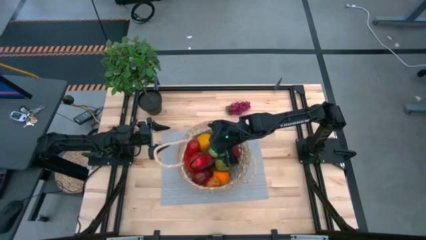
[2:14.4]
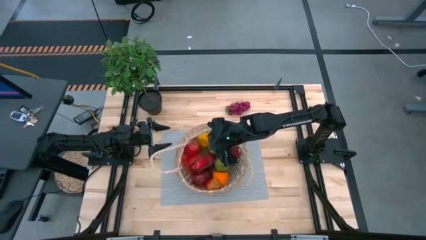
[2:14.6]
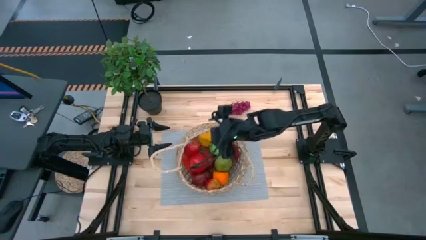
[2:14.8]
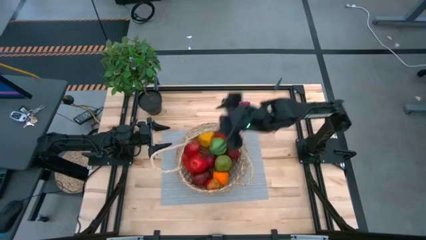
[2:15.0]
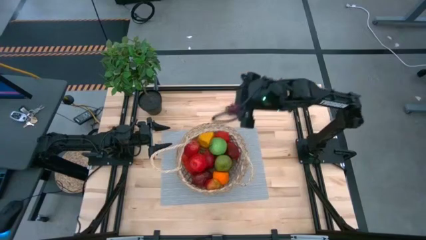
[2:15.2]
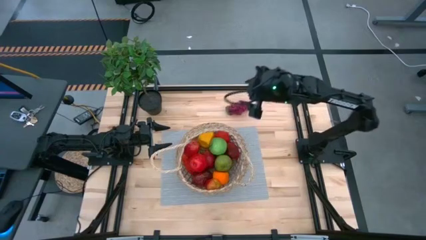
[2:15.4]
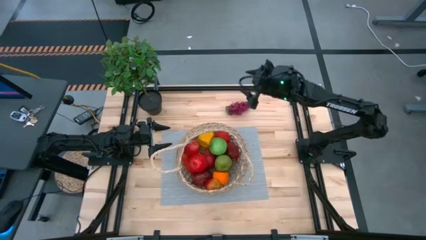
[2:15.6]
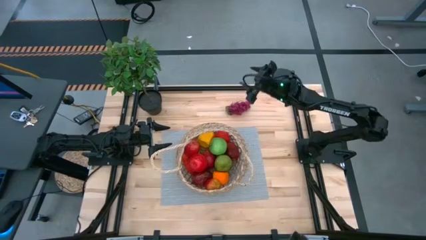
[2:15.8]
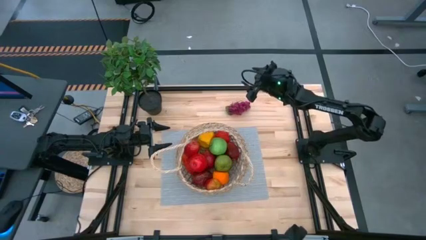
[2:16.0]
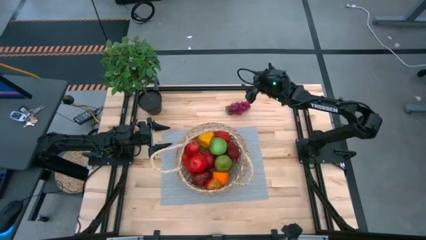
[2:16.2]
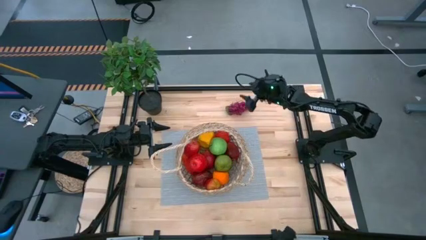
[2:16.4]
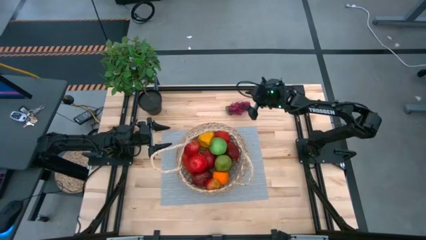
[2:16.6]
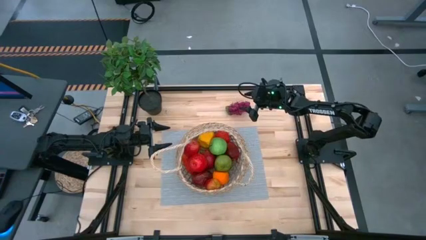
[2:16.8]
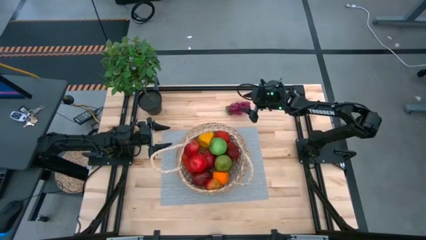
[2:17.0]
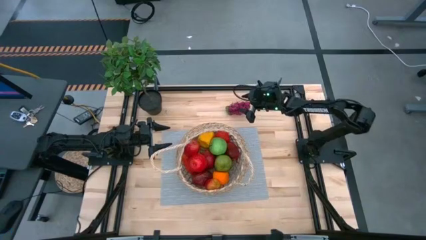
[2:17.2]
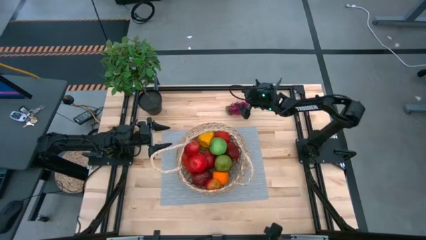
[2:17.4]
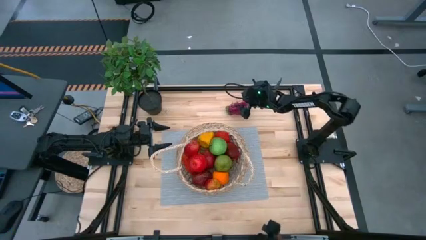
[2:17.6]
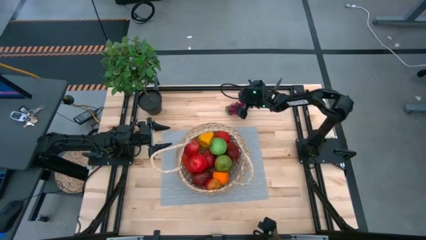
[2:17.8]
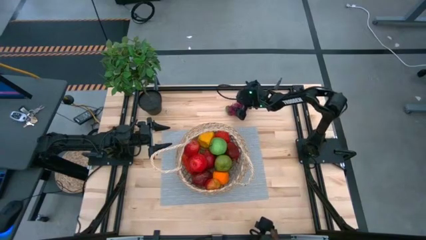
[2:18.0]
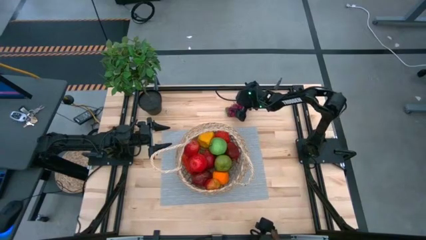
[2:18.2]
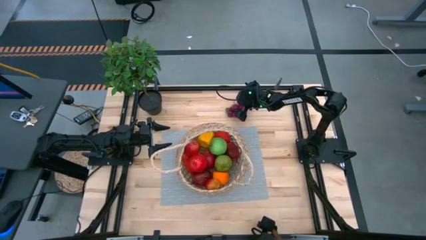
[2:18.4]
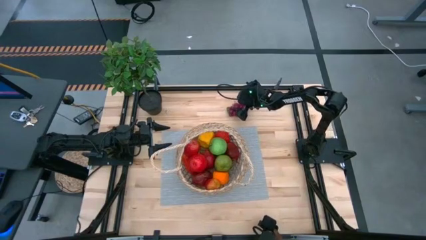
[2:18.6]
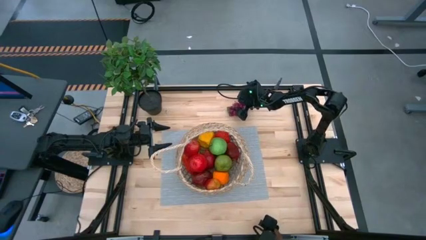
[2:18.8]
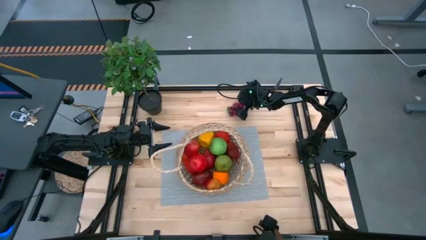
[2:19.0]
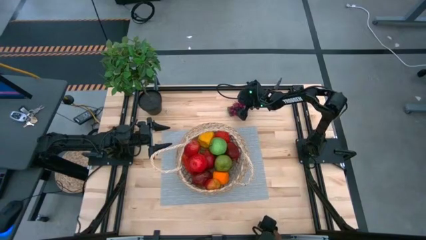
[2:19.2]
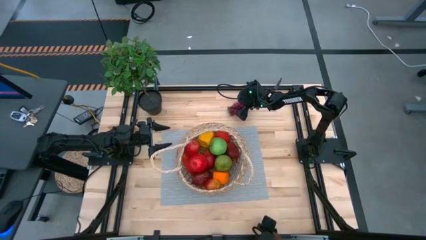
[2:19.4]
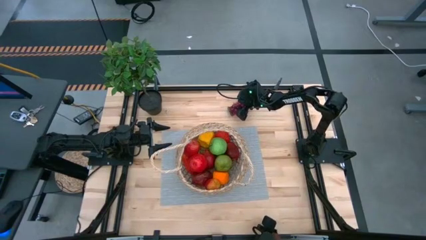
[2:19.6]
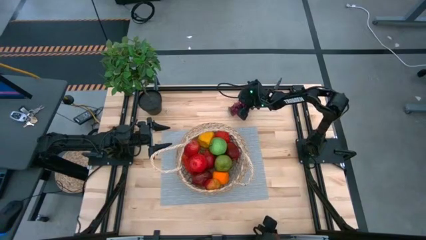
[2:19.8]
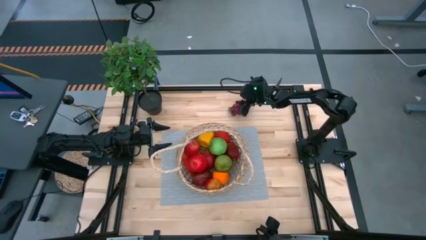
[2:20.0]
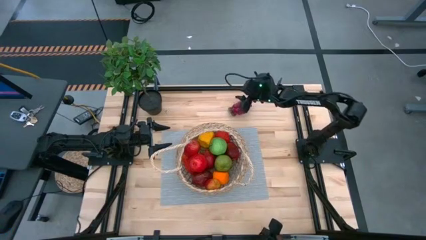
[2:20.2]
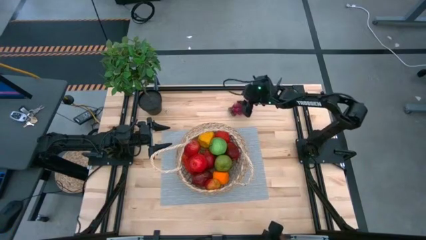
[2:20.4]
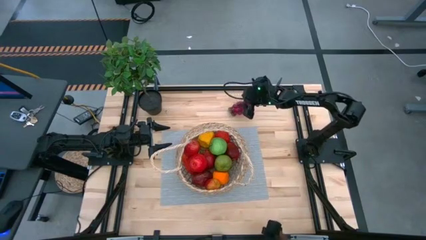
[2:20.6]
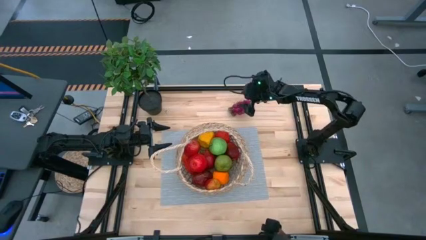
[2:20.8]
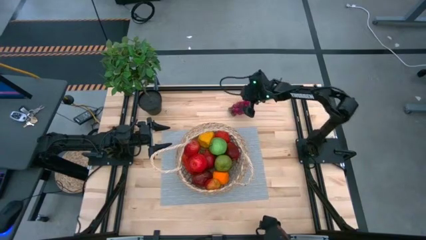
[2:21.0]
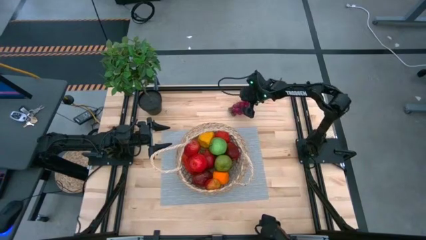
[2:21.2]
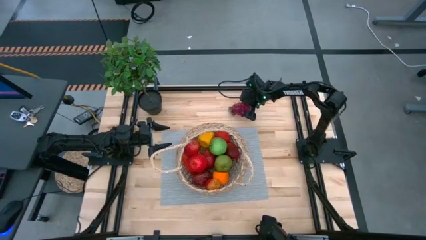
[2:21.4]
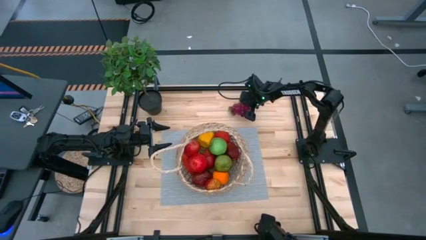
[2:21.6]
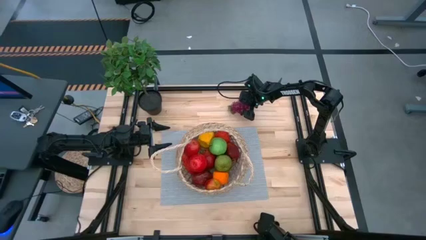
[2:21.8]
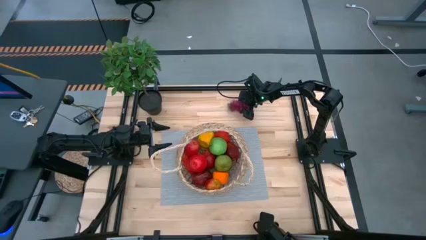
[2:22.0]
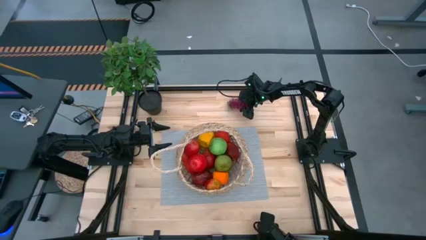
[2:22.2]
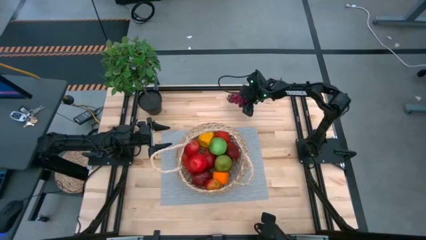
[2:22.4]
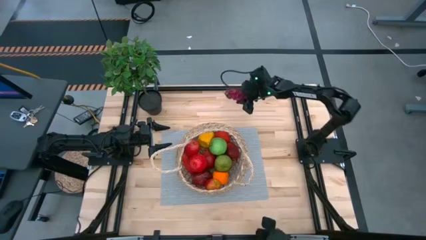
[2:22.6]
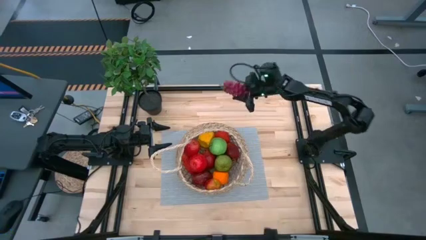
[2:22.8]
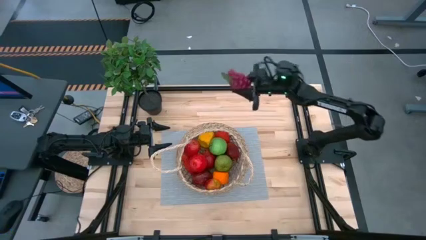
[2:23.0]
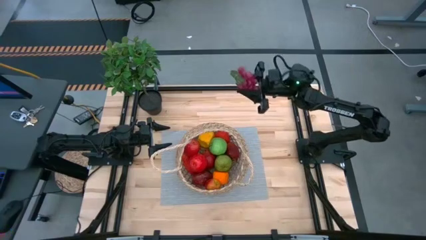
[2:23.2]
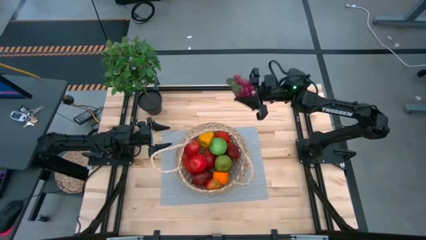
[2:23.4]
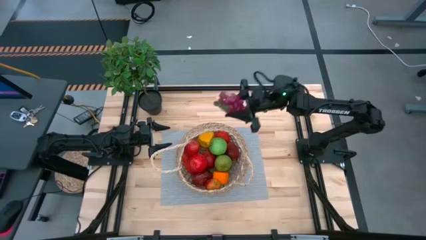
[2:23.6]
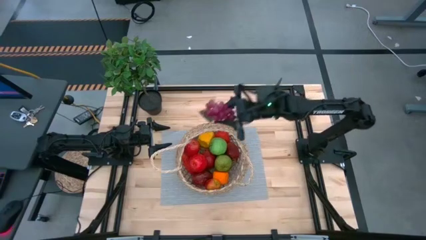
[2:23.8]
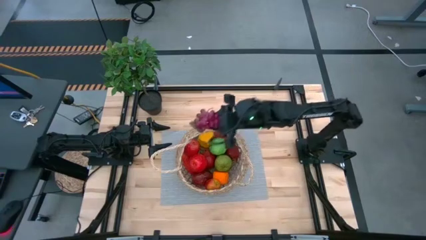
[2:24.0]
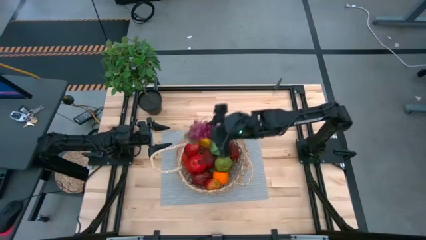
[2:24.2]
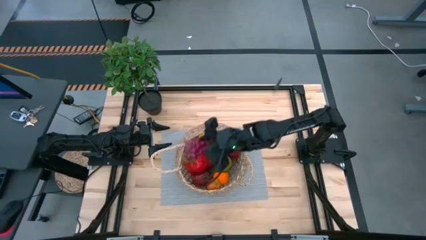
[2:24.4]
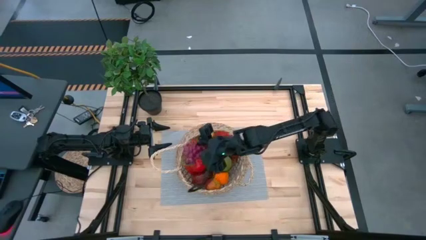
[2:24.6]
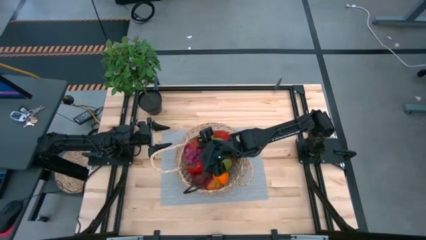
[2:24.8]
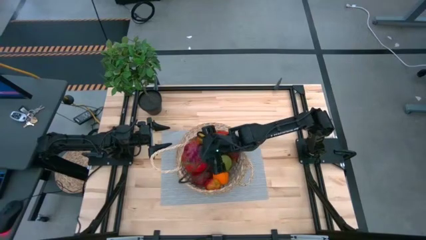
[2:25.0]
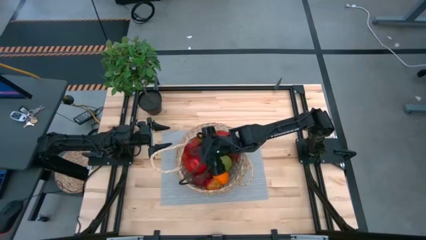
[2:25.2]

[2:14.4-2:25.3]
Task: Build produce basket
Put the grapes into the basket

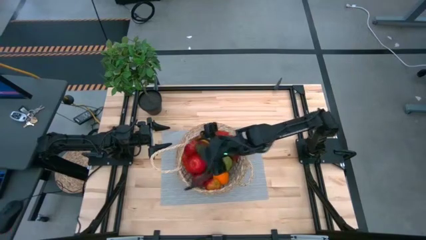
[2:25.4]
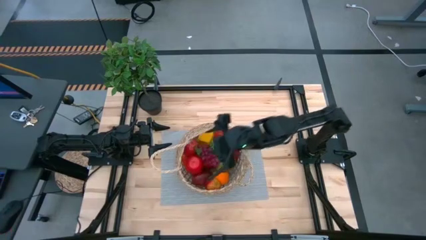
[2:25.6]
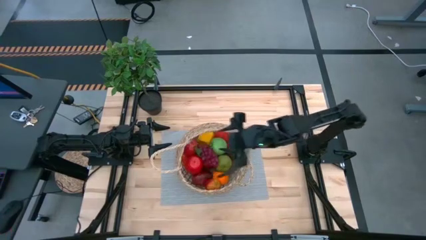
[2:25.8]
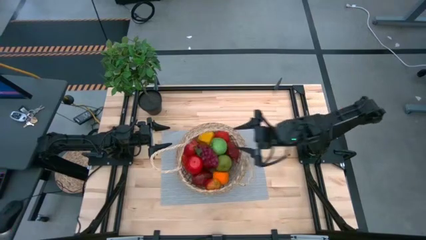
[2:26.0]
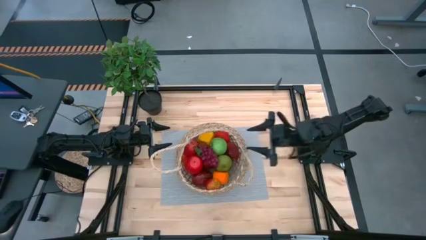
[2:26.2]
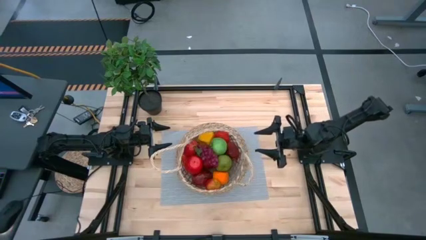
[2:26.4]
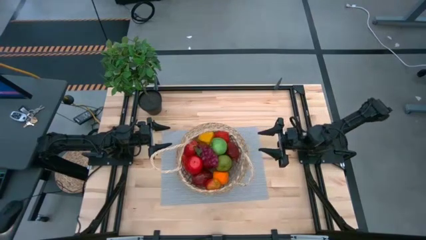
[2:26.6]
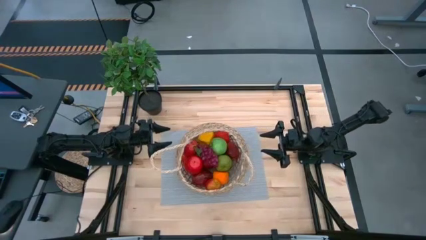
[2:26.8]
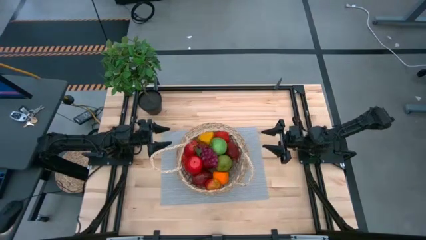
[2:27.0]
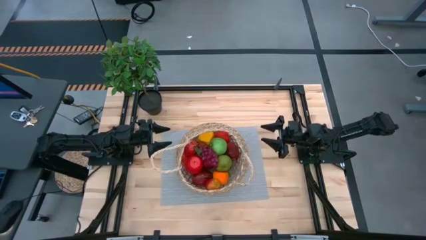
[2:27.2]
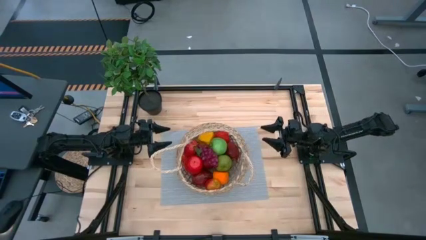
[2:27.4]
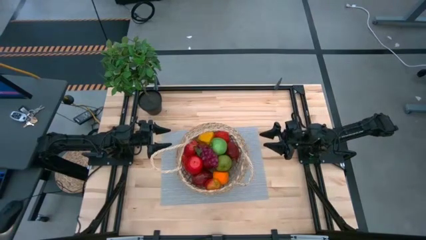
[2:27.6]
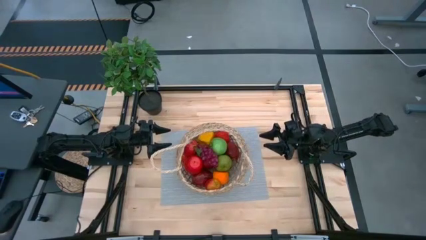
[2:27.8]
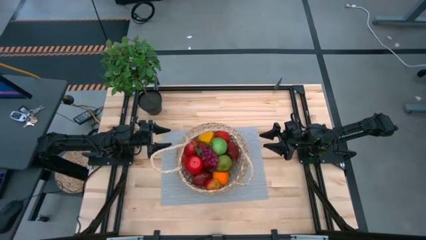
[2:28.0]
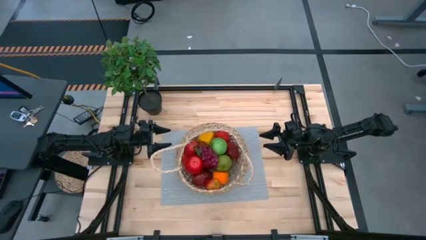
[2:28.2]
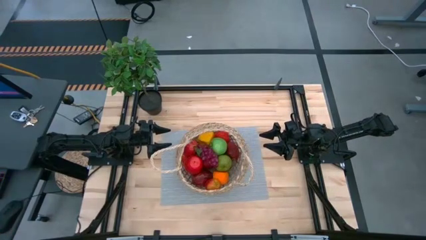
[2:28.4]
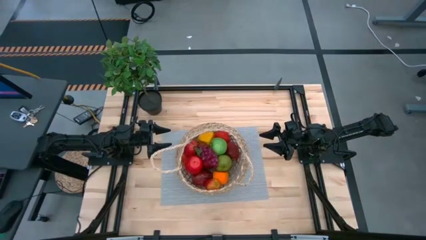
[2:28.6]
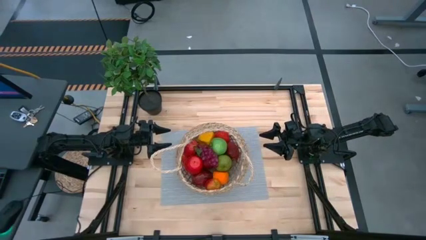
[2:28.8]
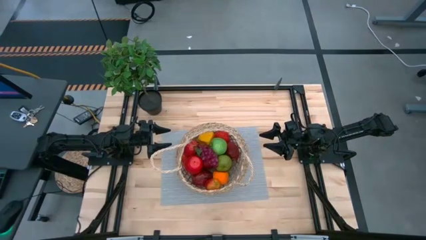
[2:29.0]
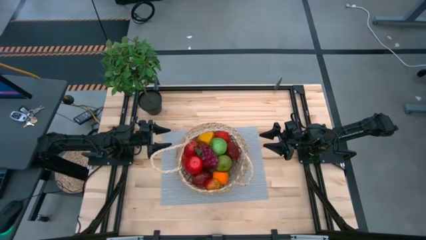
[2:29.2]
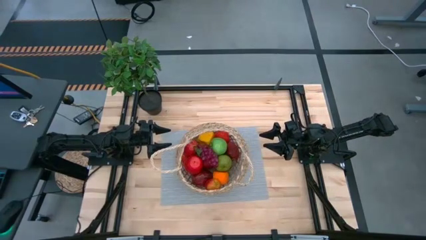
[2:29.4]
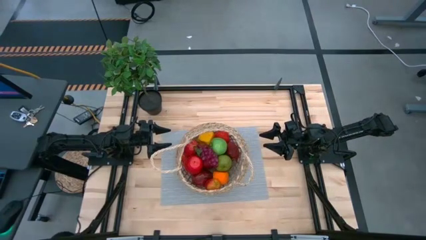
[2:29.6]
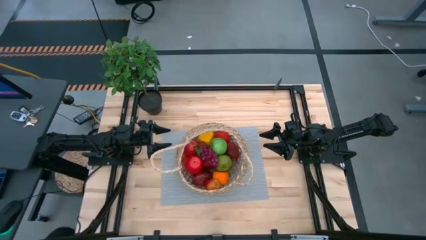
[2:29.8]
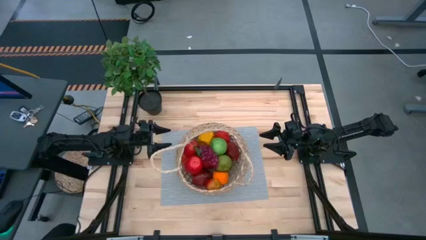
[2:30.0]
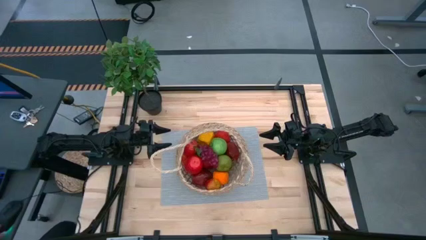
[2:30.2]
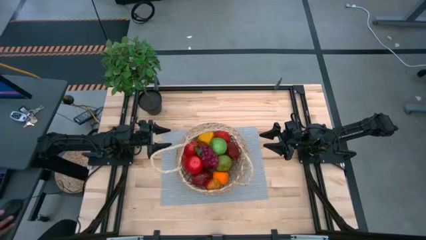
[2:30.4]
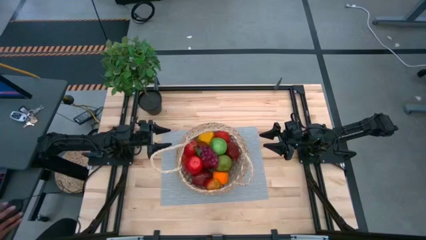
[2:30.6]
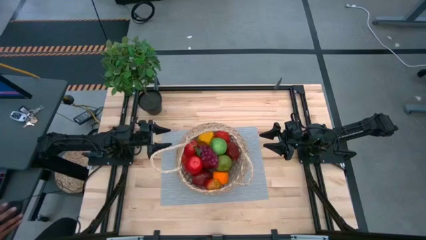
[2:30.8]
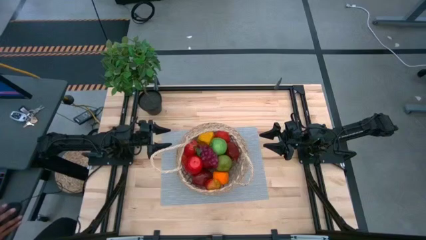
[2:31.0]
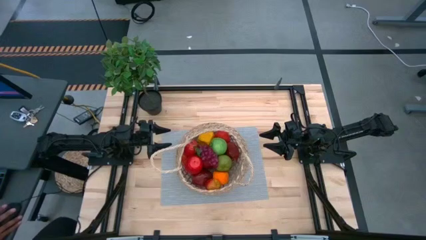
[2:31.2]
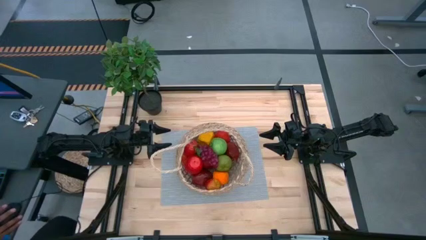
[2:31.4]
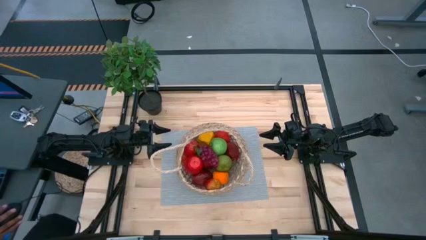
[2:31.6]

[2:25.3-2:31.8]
Return to Home Position
